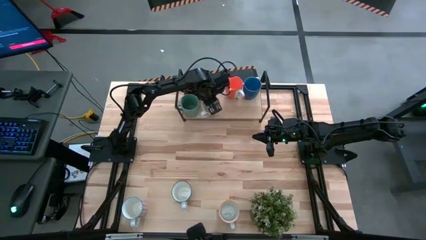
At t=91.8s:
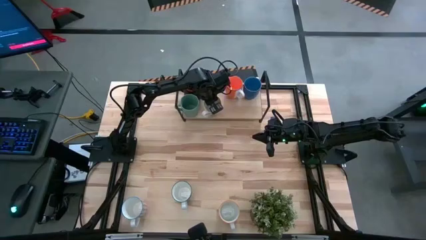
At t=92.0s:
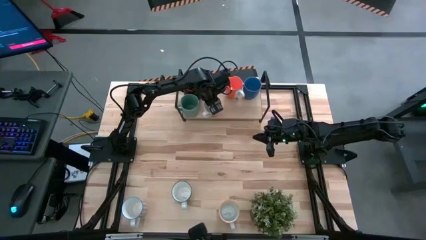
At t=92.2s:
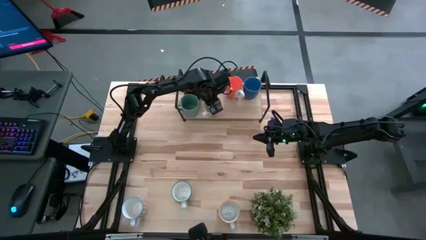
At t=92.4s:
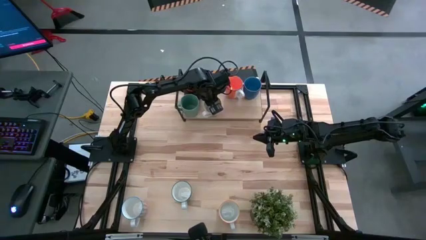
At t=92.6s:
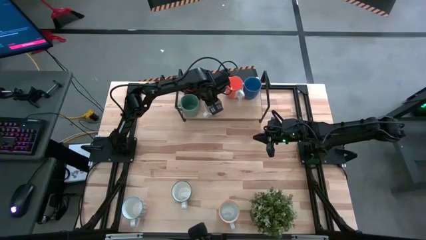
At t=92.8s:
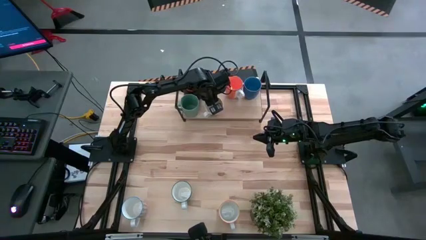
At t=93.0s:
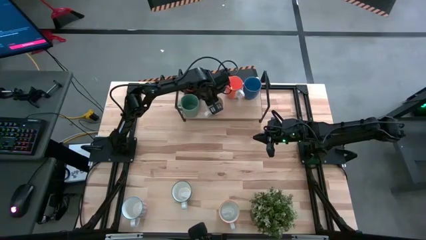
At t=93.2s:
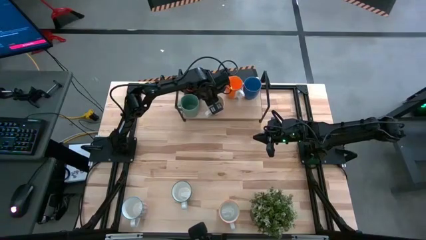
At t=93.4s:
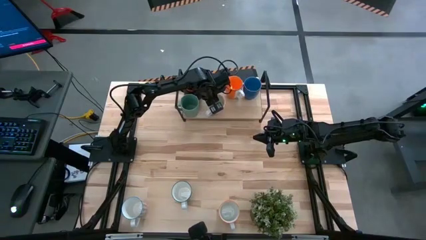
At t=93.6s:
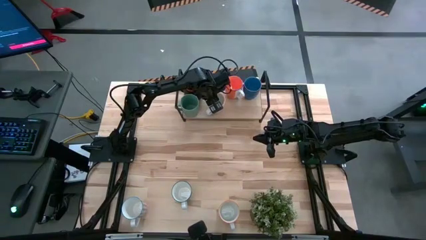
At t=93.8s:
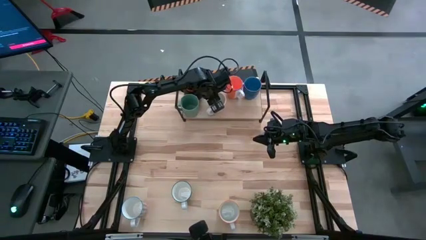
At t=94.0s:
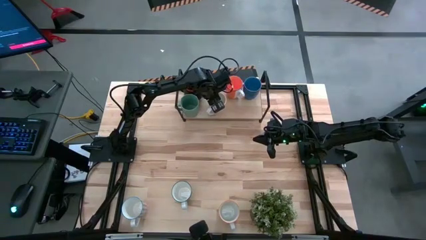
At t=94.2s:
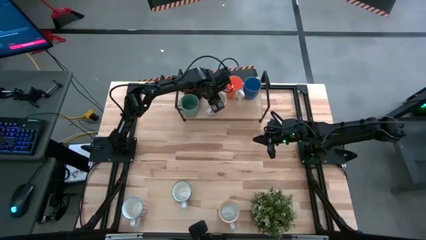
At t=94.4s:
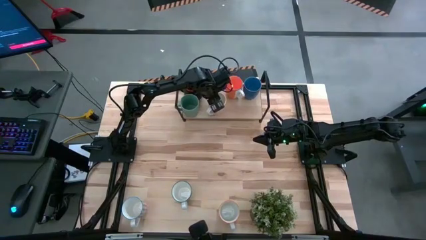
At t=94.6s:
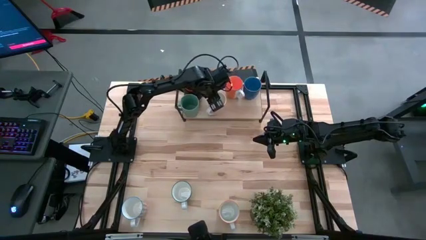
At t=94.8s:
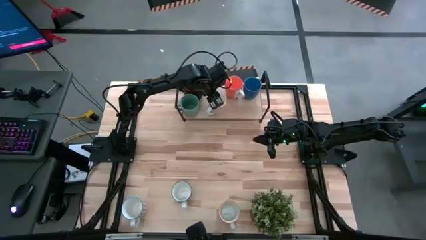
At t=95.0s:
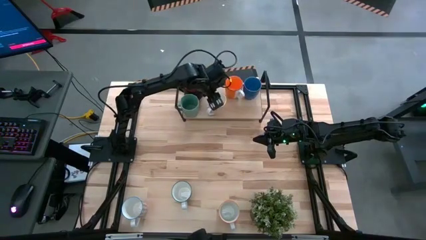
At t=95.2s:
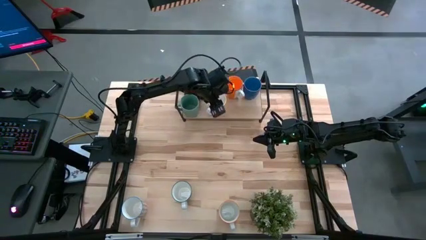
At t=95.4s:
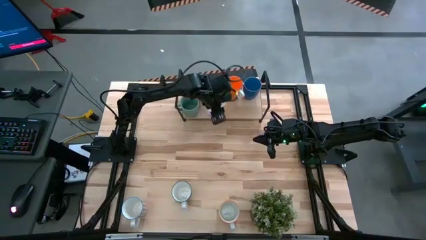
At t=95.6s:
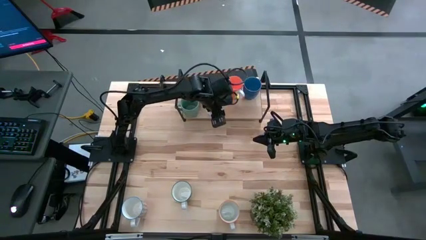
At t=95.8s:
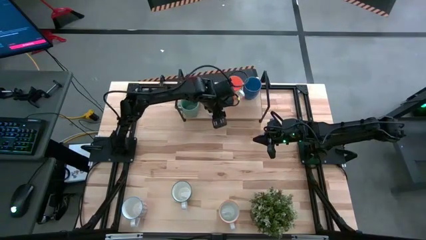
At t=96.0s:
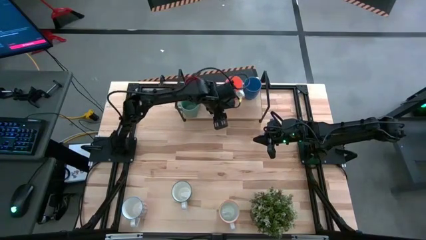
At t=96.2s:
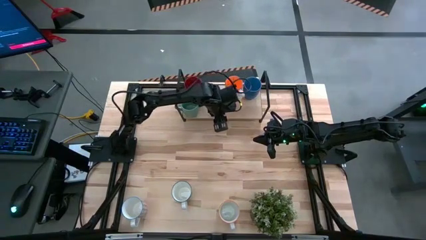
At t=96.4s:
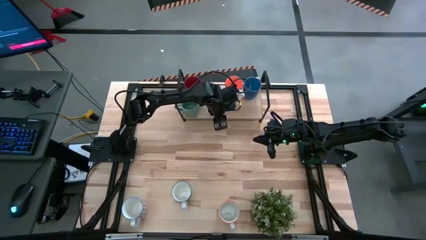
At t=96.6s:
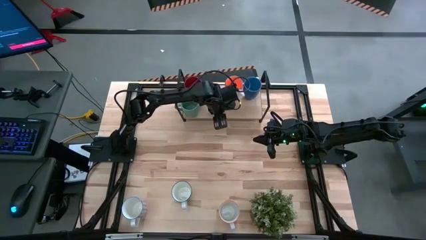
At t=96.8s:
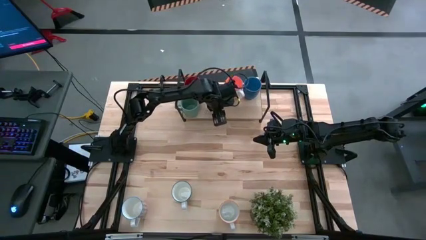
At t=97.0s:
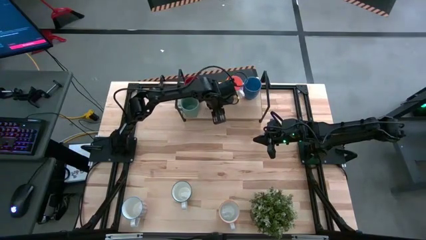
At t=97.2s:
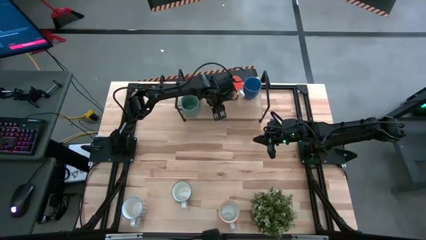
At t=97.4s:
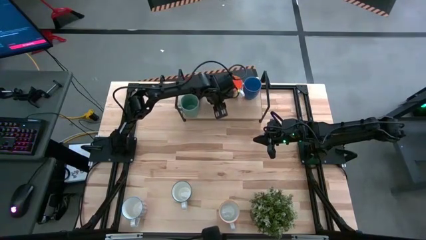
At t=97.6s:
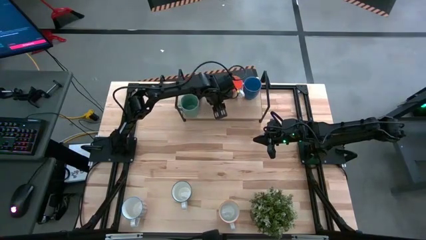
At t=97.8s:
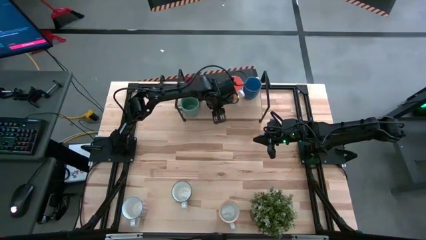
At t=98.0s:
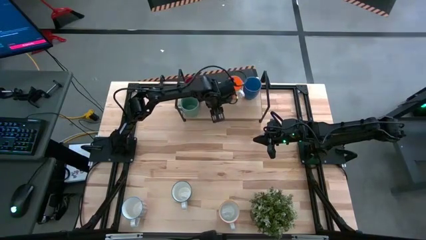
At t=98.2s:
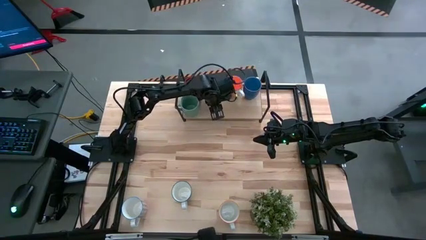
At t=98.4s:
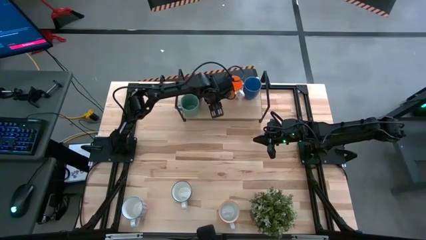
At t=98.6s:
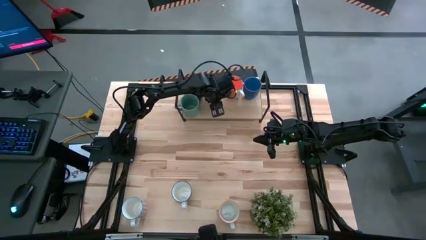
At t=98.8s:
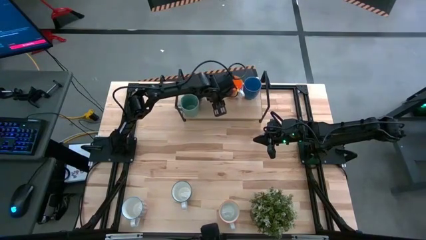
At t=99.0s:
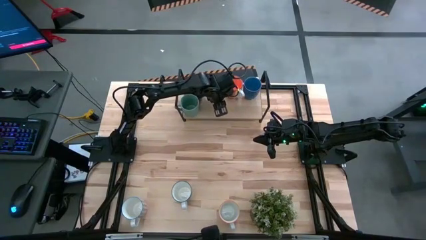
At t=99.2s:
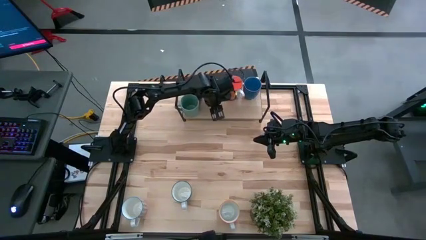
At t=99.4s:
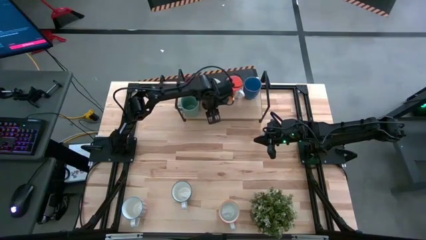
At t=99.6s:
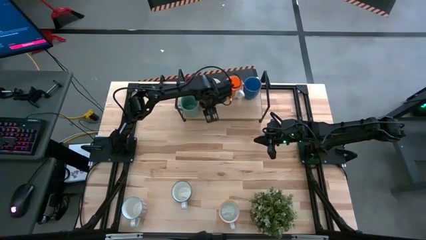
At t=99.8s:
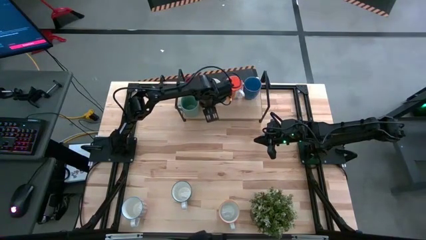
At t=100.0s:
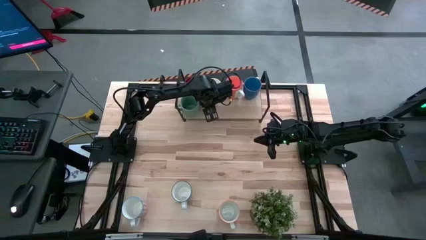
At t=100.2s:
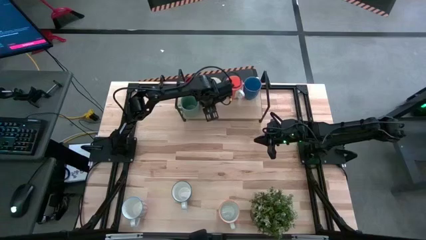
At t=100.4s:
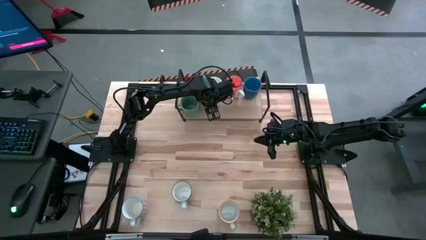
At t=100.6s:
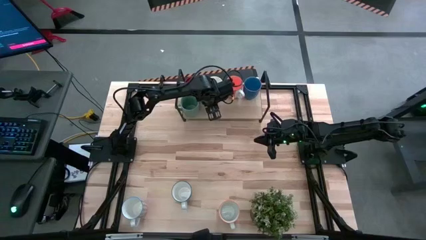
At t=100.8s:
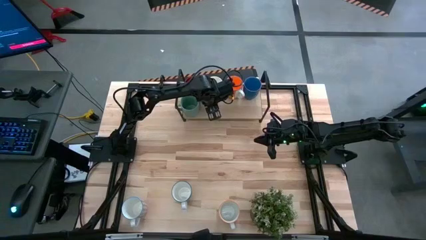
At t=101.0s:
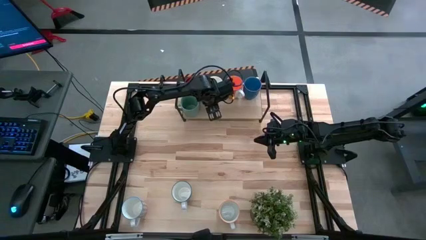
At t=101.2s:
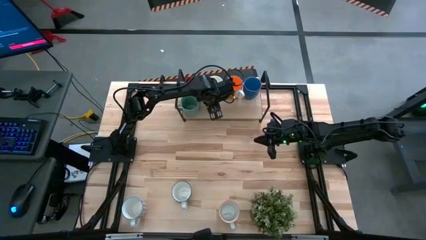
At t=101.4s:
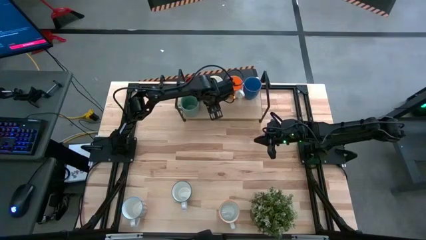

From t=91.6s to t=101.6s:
Task: Place coffee mugs
Put the orange pattern mug on the shelf

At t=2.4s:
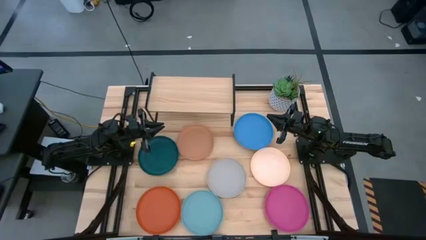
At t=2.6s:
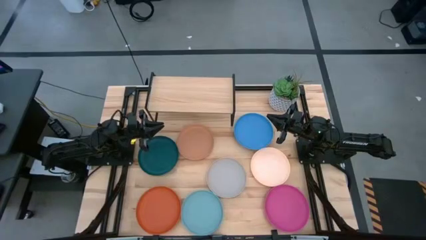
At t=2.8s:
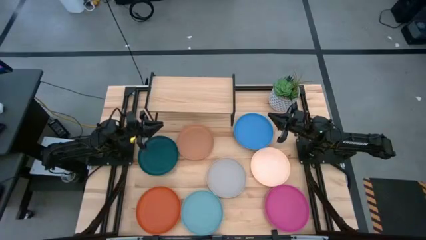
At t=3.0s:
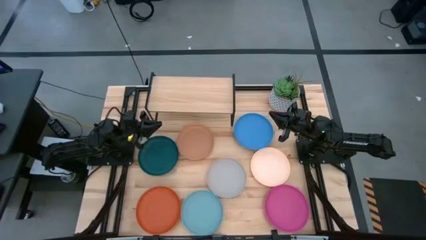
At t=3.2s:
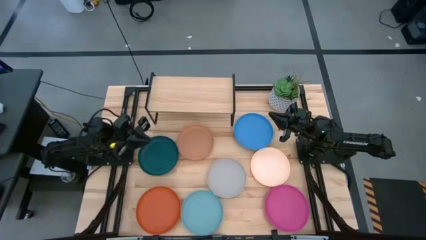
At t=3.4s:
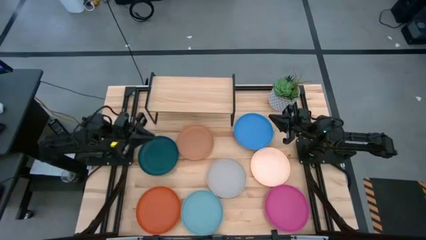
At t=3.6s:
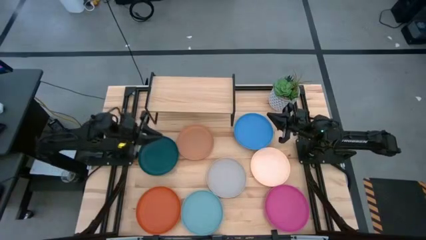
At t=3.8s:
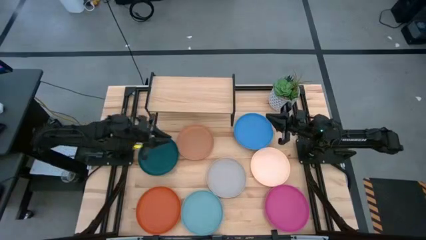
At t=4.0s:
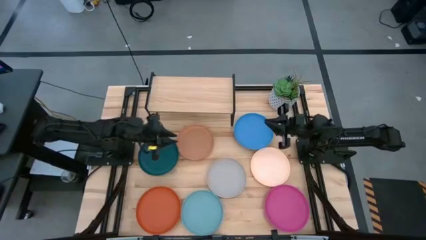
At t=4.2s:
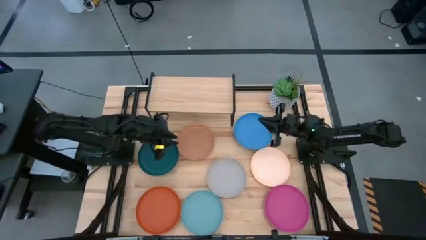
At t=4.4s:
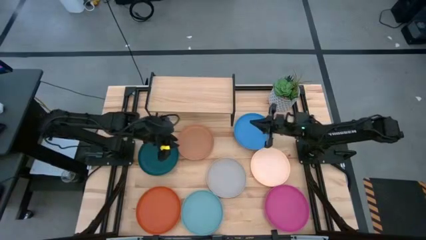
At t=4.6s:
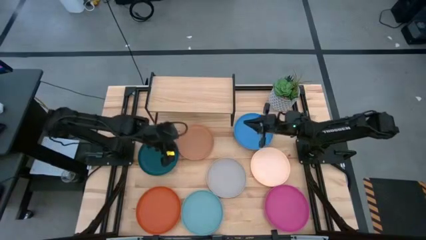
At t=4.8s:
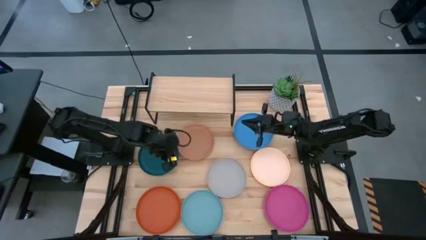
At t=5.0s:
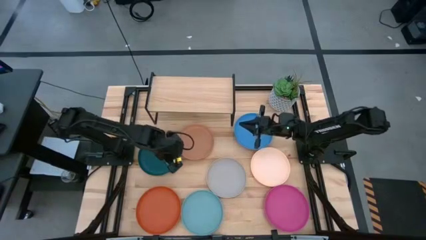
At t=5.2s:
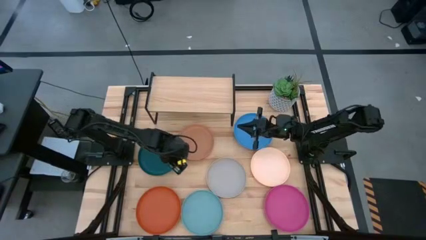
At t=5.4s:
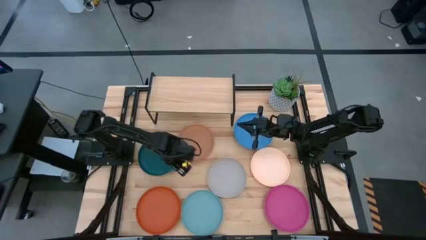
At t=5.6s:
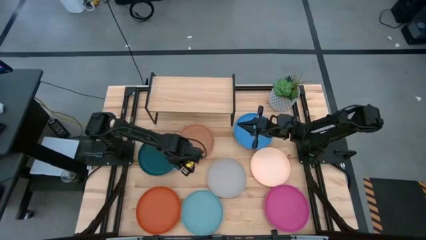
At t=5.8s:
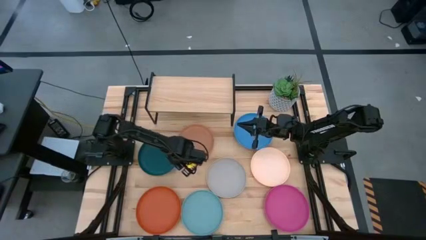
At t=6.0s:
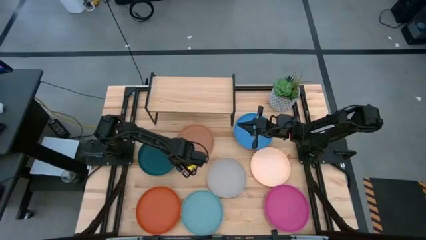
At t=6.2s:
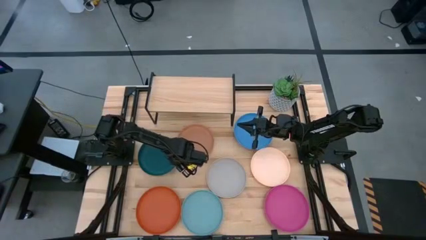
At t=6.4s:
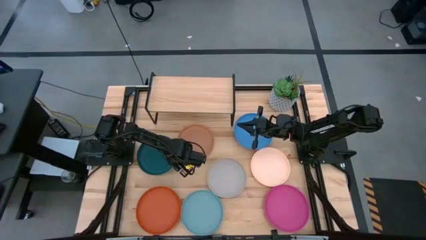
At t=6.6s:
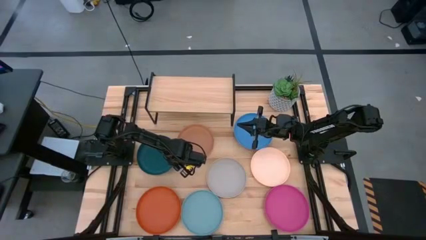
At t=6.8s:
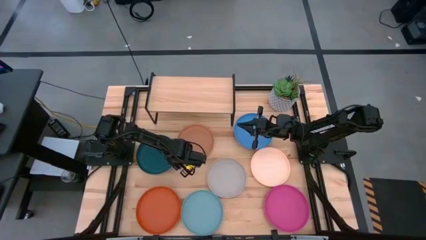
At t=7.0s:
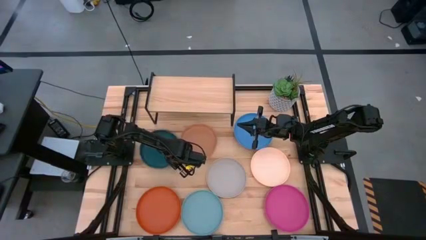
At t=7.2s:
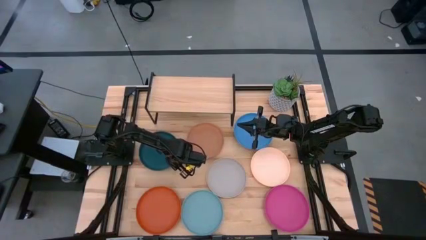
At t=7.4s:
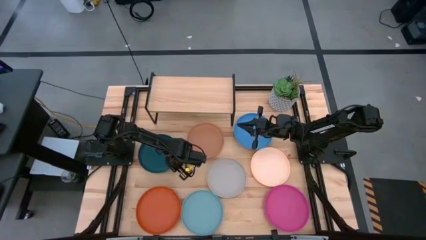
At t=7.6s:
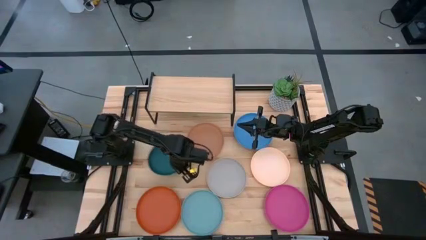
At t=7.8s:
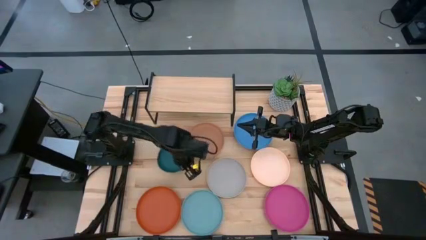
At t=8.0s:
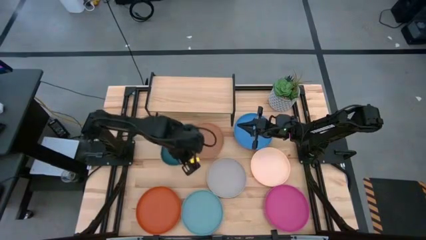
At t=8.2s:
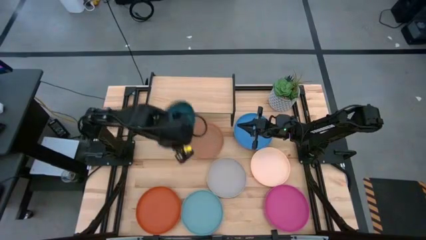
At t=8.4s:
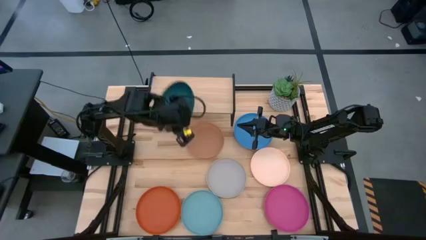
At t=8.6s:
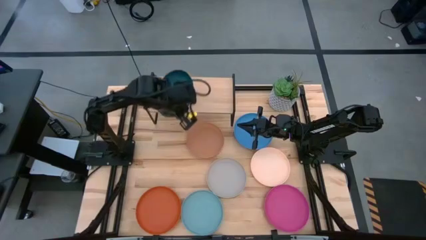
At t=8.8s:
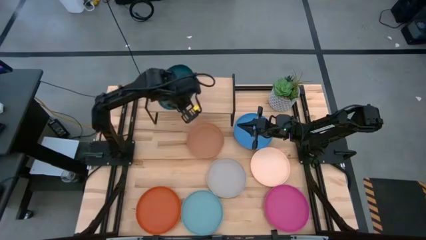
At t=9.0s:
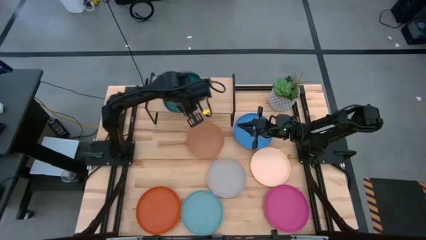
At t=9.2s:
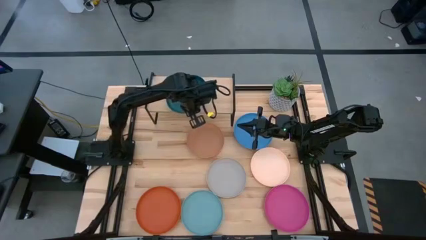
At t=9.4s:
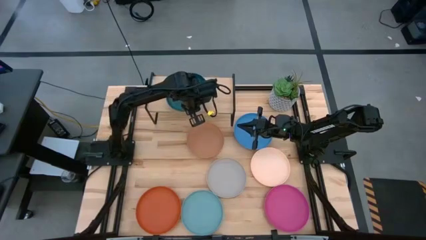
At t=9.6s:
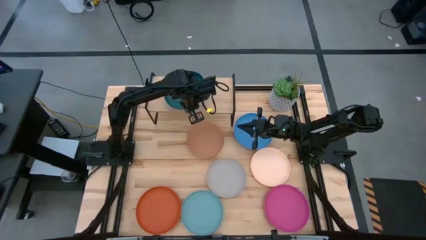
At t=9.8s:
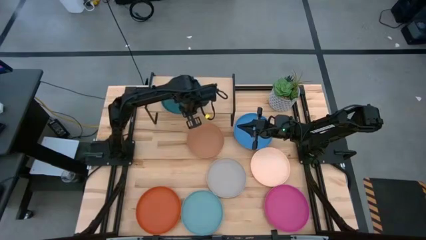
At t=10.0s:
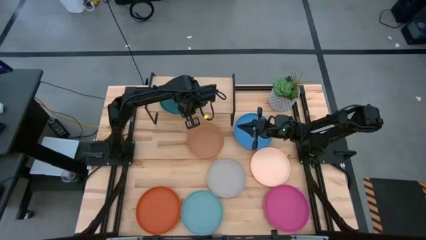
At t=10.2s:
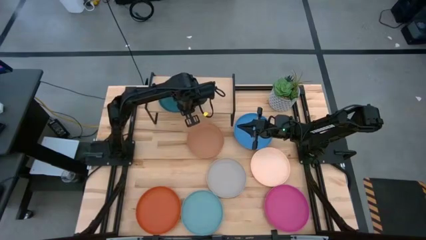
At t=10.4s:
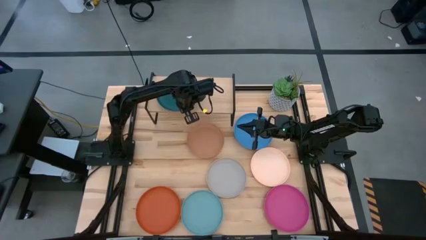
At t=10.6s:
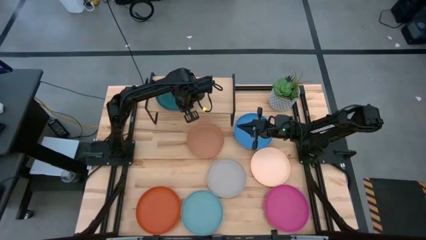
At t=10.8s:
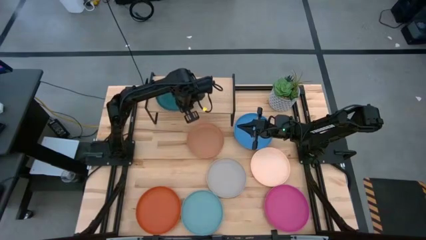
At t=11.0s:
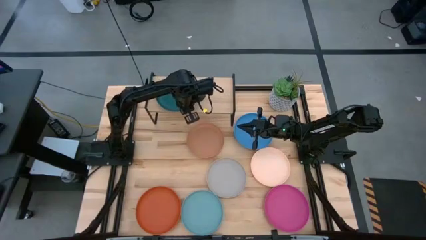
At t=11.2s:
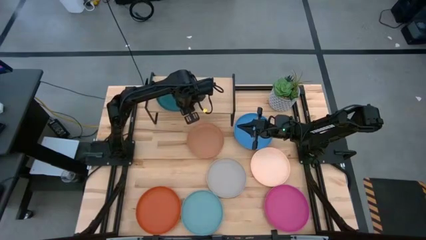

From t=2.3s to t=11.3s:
Task: Place and stack plates onto a shelf
Put the green plate on the shelf
